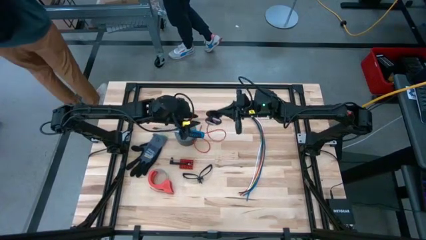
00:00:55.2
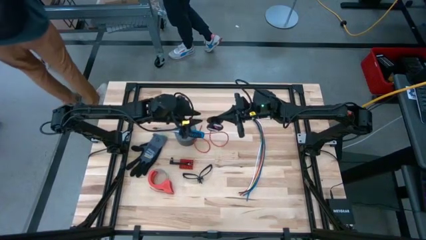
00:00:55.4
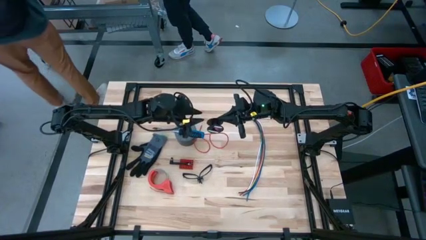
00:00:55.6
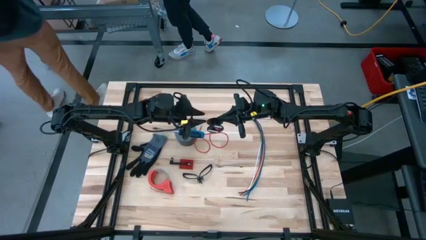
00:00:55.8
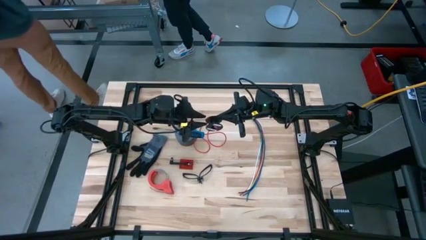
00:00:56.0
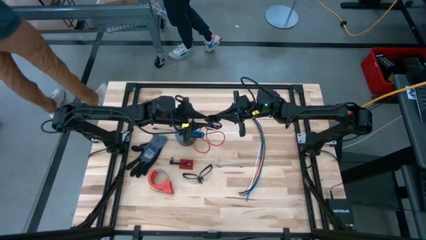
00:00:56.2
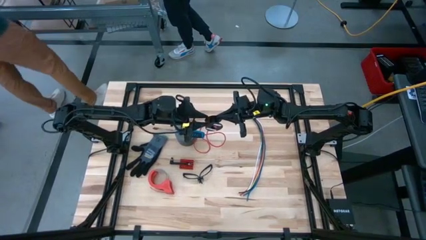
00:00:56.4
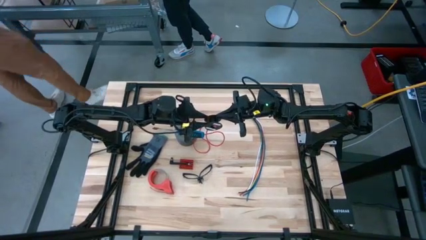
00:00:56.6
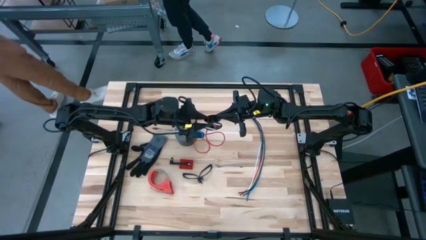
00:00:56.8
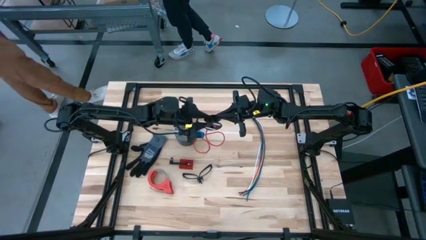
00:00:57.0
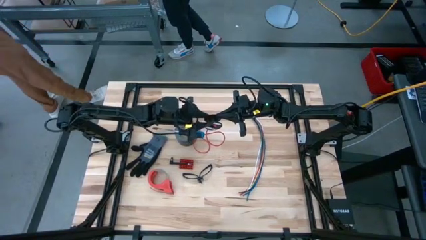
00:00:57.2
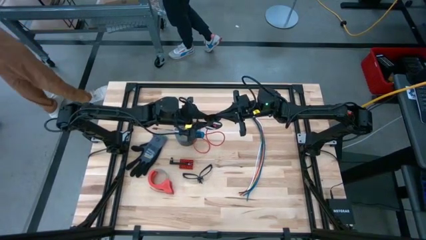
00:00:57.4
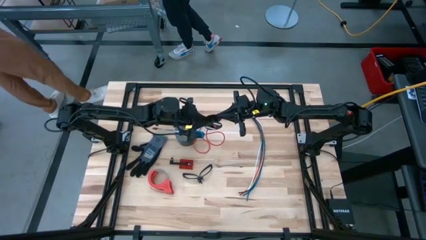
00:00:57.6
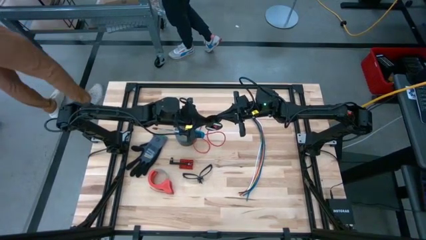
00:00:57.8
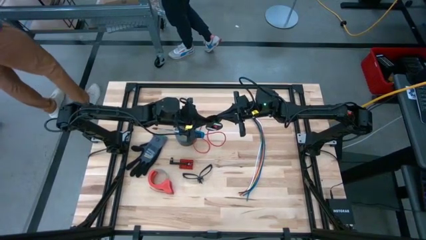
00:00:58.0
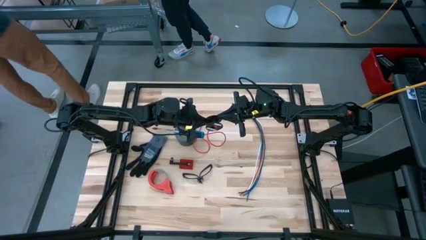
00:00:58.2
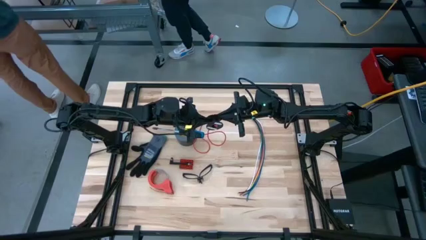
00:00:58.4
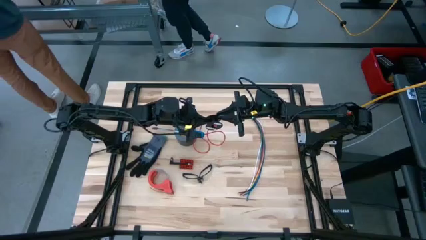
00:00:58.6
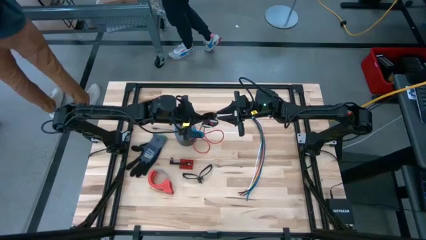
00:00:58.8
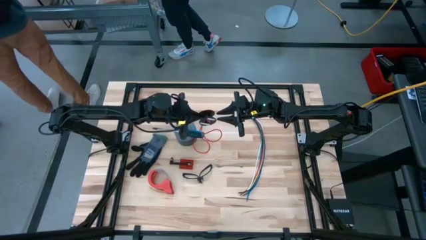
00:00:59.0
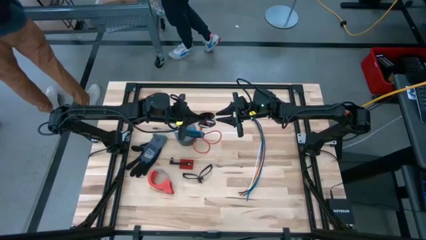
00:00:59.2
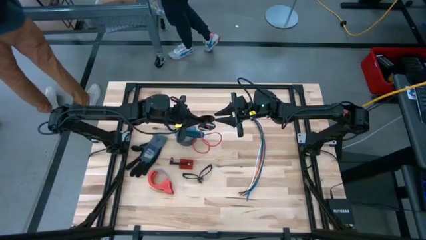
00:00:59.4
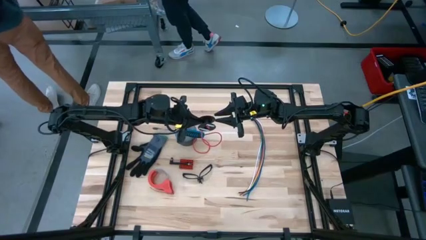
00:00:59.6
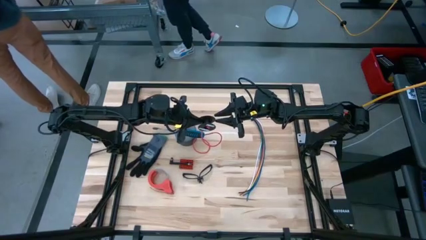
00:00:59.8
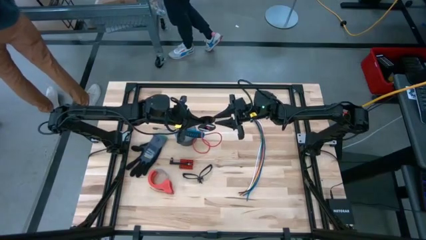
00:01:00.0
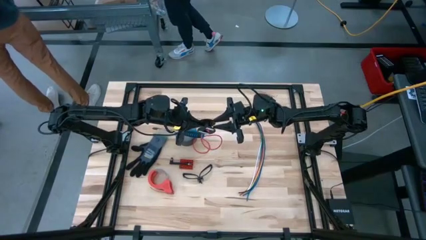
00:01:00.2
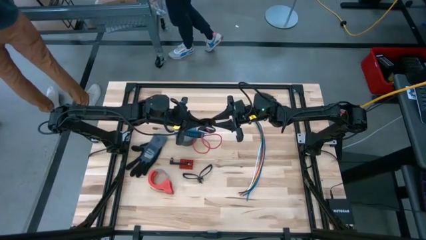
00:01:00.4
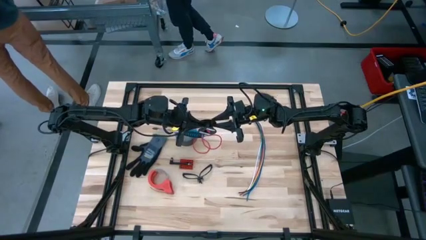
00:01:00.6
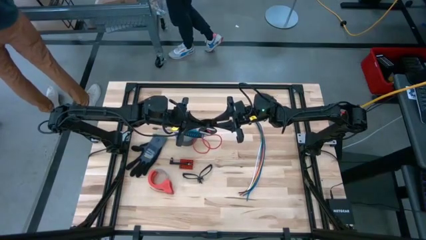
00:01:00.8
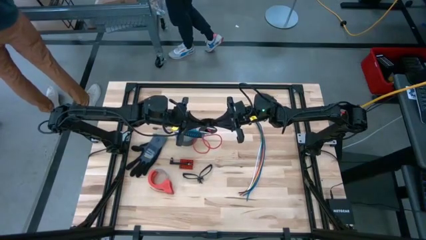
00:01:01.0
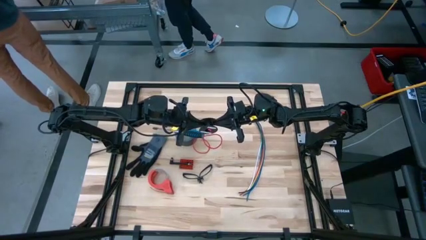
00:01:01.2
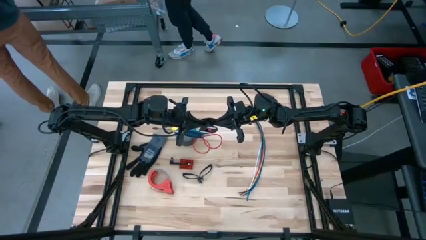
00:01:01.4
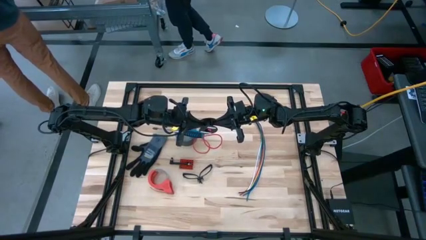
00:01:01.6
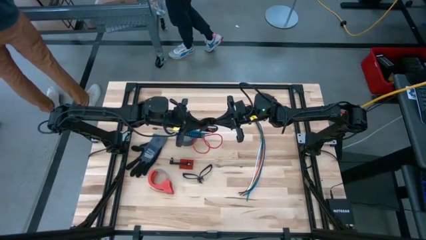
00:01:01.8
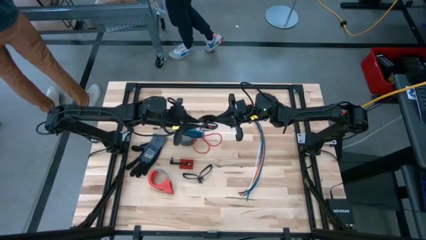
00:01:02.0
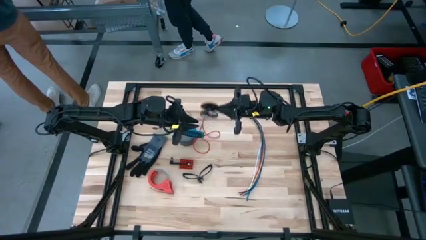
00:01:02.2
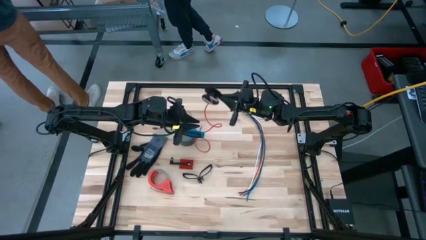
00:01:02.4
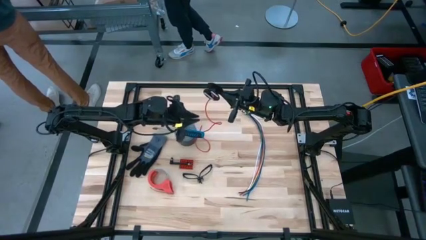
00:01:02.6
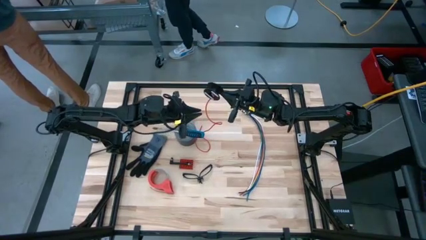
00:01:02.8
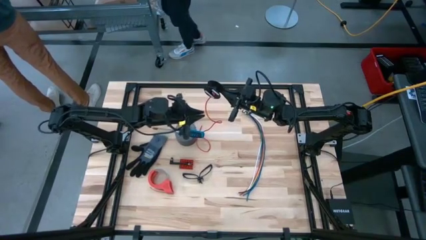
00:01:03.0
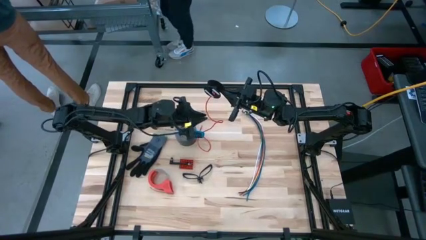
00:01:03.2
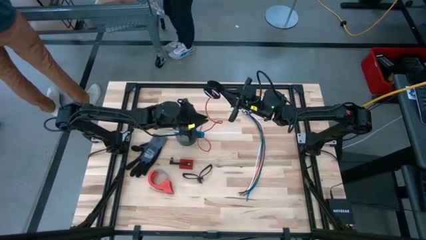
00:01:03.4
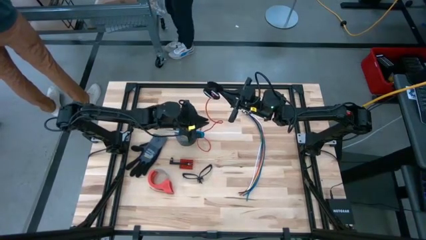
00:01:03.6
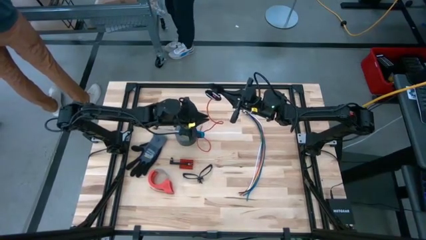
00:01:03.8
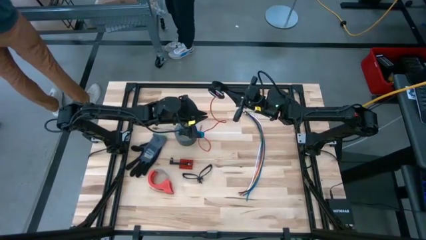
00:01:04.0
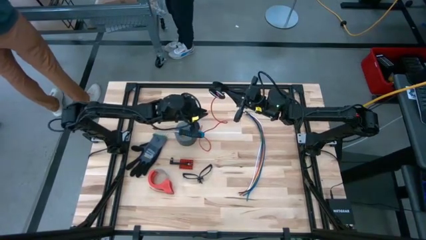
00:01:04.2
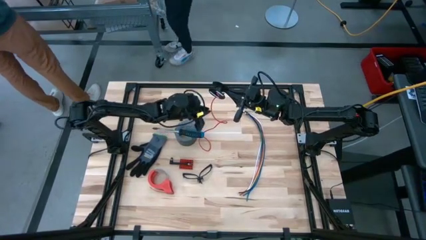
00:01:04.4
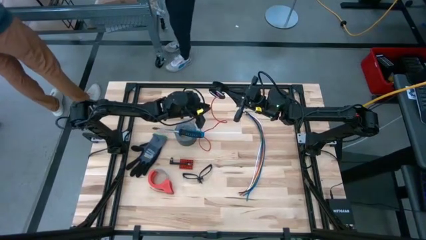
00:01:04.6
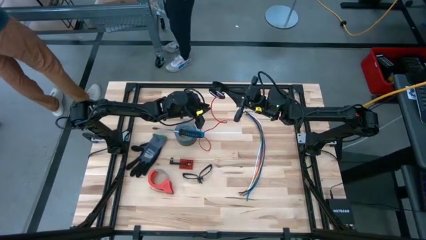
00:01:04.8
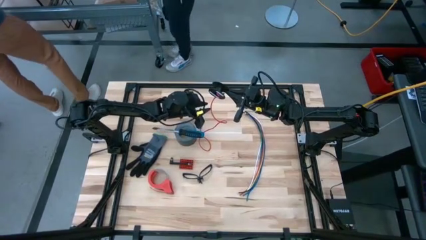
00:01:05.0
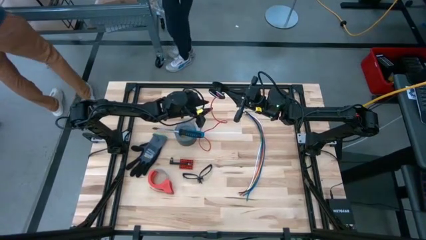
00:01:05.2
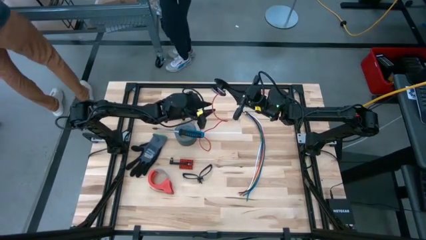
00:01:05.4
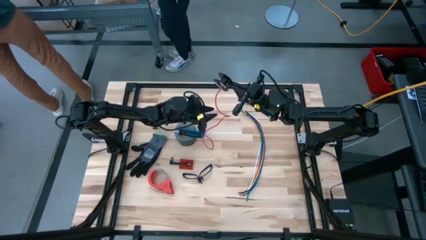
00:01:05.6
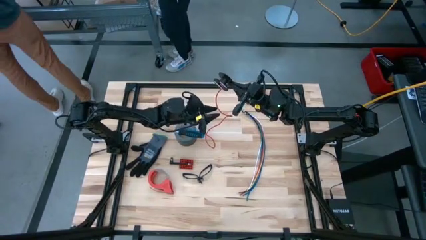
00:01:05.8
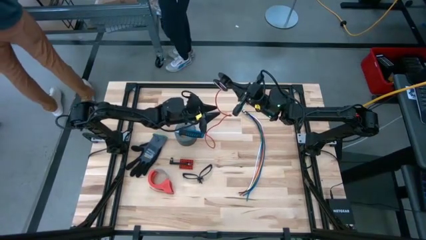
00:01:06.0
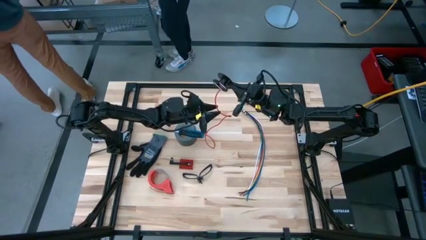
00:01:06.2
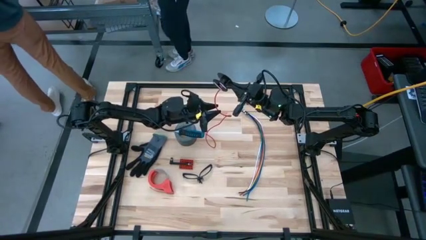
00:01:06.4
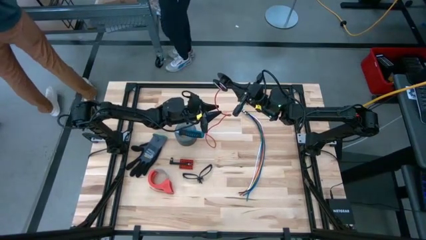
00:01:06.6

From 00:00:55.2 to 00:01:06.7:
Task: Coil cords
Coil the red wire into the black spool

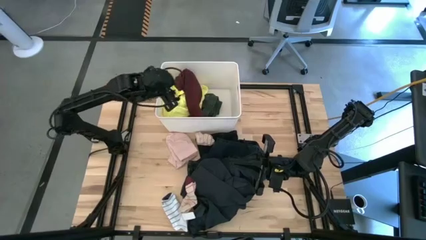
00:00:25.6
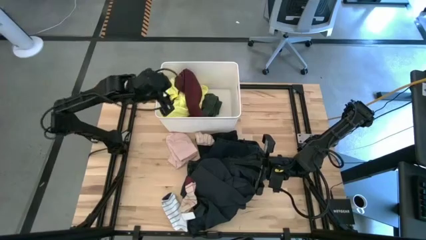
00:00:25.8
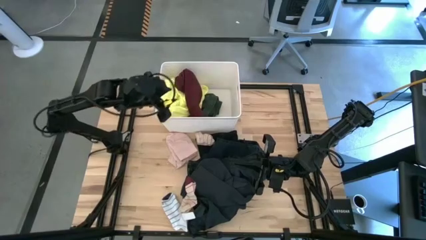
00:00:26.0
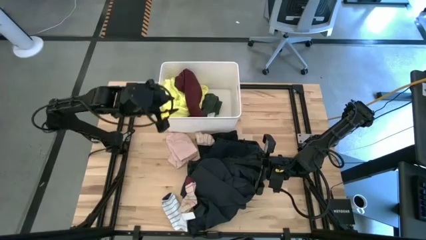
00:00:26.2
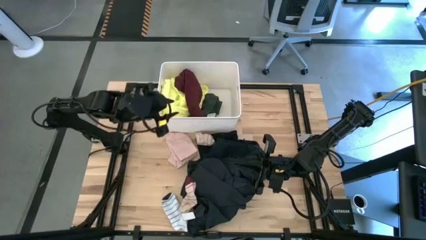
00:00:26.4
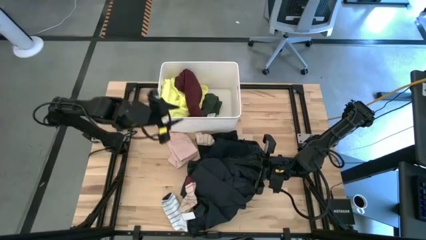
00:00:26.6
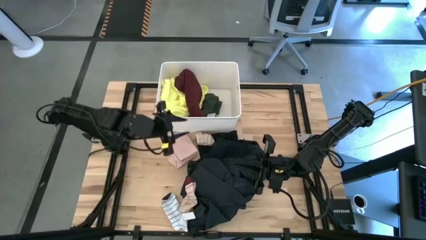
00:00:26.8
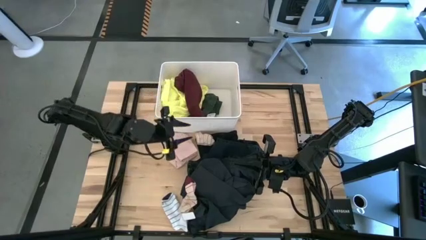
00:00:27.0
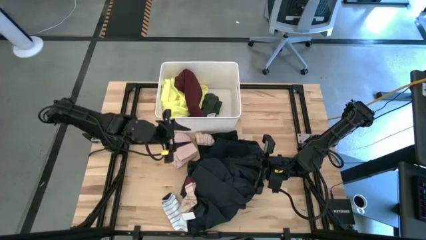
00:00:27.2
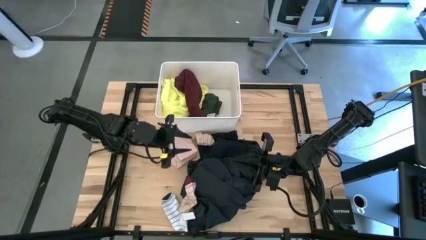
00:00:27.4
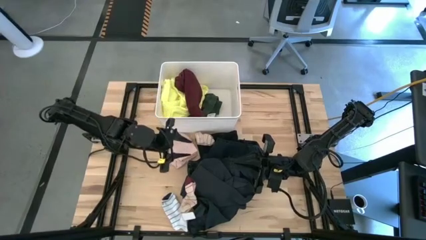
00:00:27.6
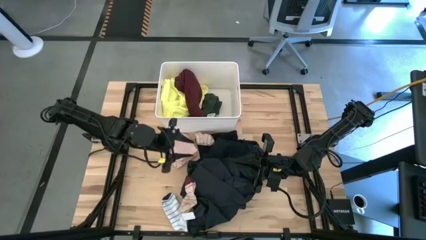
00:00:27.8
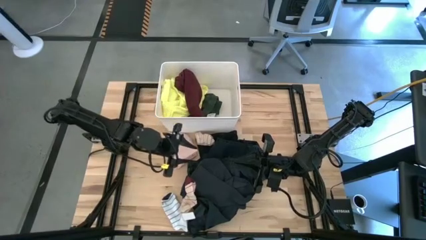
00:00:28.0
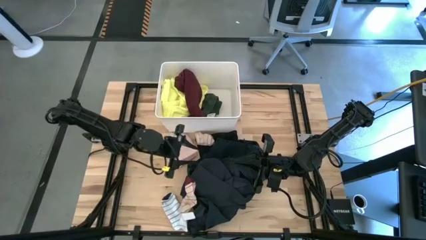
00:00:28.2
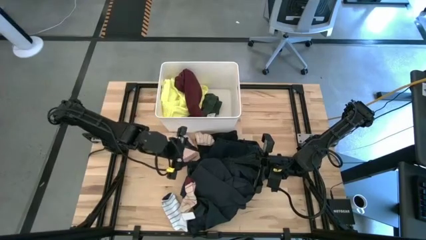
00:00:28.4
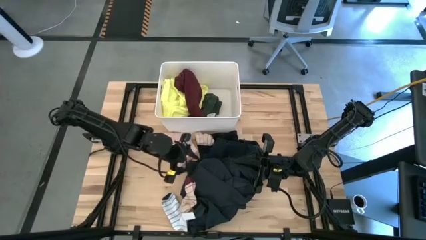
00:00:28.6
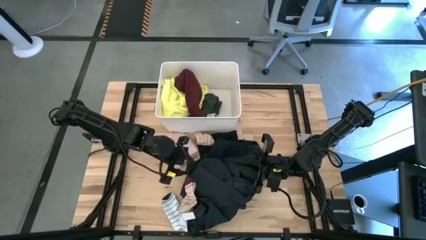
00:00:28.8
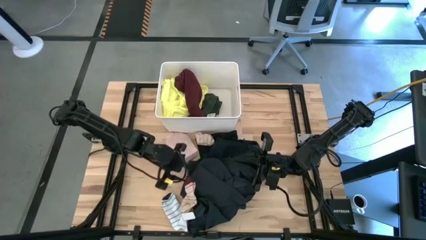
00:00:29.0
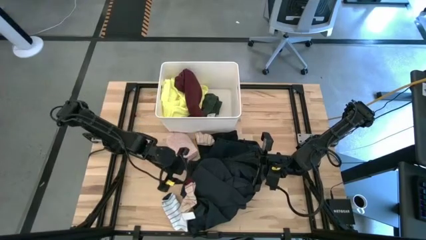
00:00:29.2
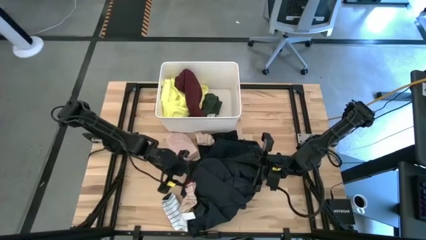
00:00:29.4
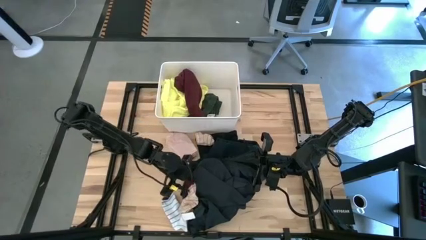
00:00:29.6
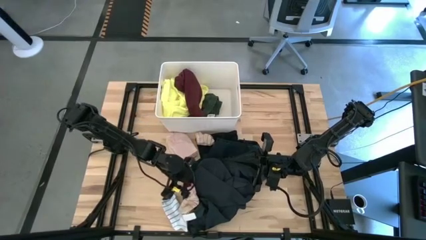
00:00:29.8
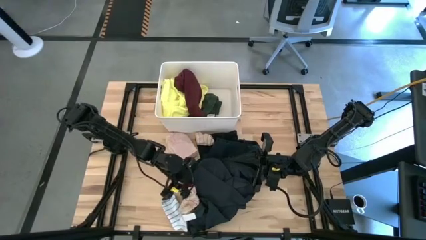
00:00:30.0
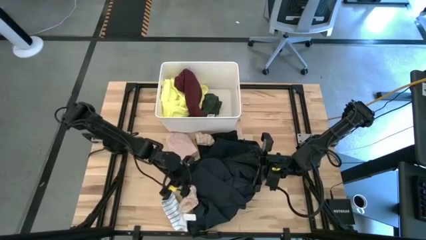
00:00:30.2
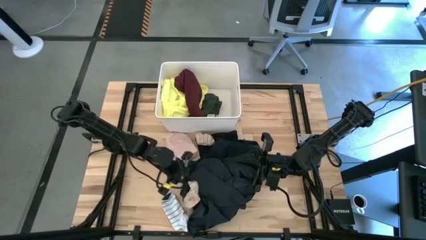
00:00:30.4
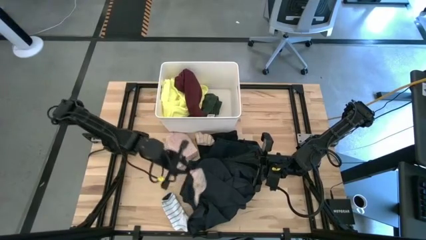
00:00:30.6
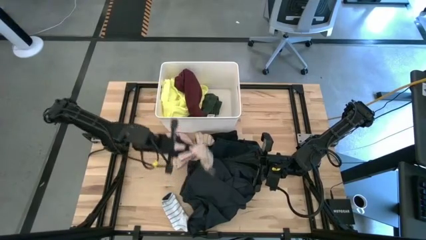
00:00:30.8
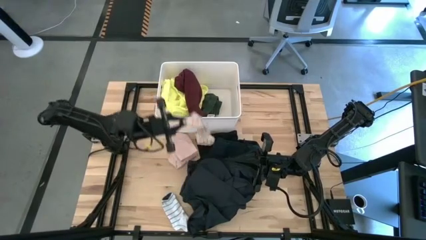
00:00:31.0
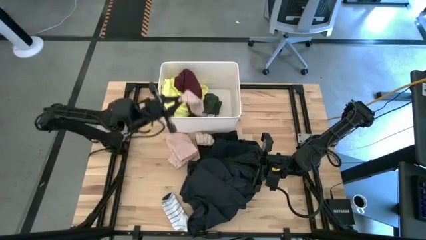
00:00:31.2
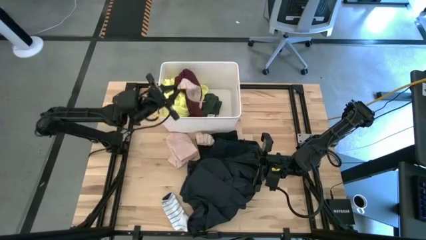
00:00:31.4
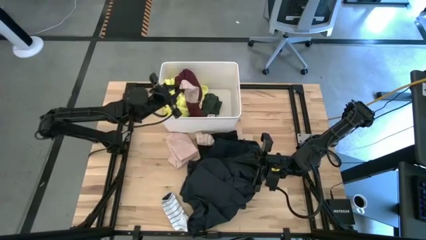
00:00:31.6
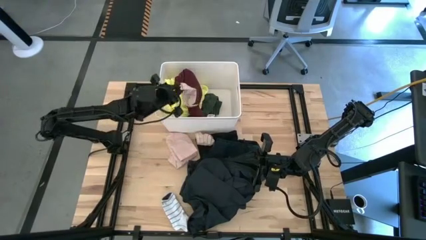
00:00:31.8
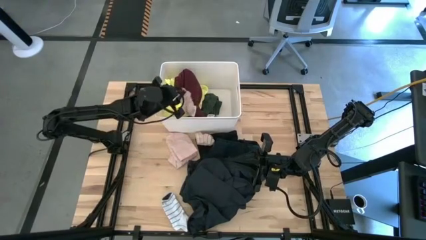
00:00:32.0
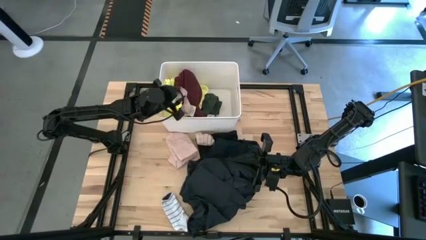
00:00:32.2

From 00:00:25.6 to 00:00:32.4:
Task: Sort clothes
Put the red sock into the white laundry organizer
